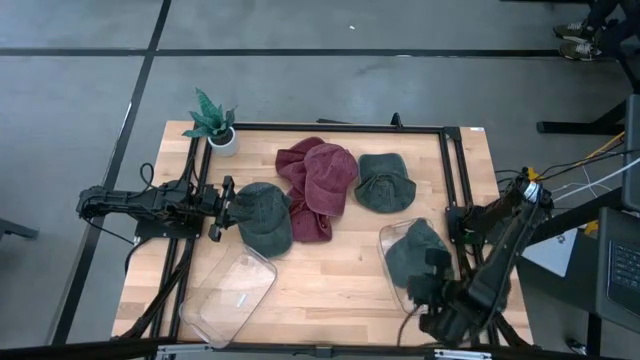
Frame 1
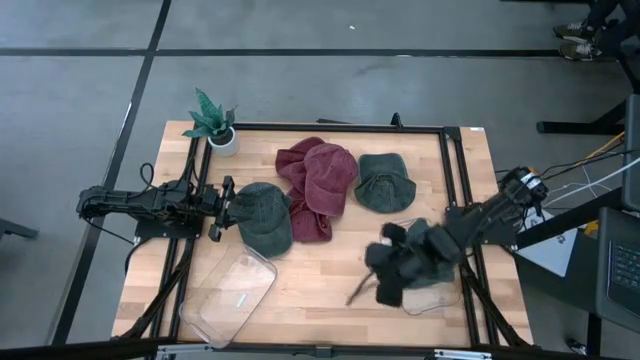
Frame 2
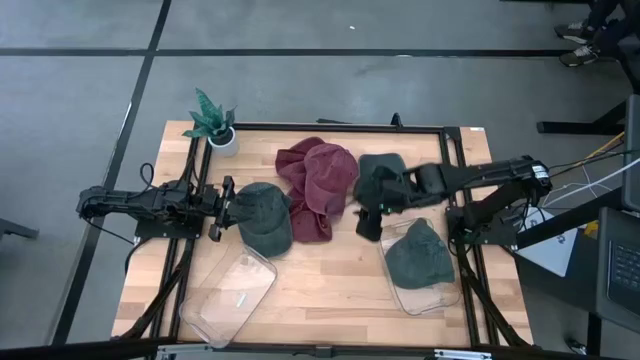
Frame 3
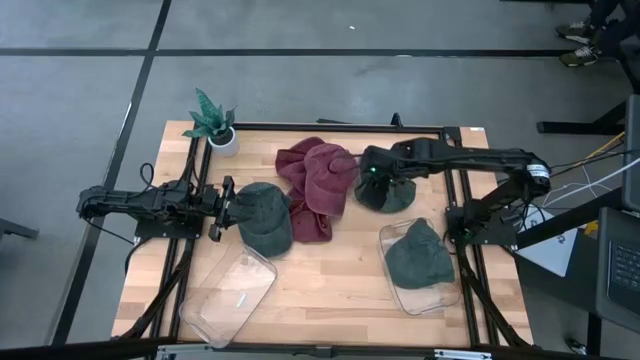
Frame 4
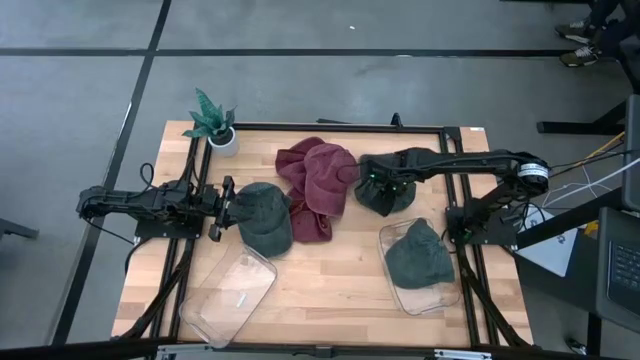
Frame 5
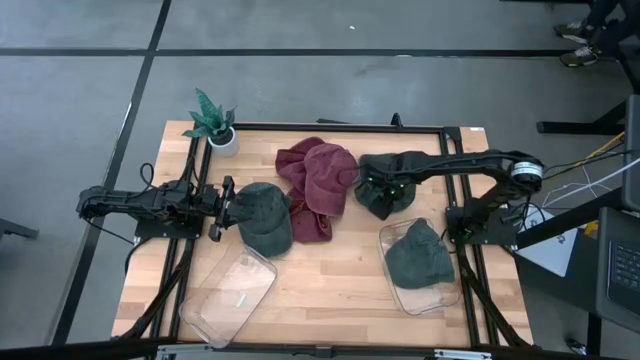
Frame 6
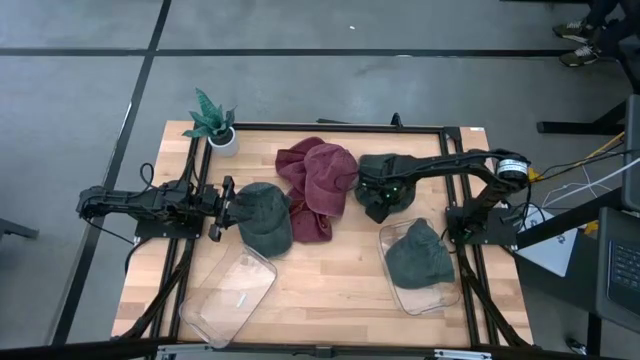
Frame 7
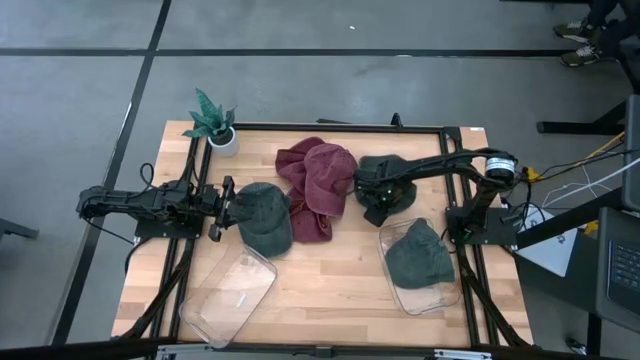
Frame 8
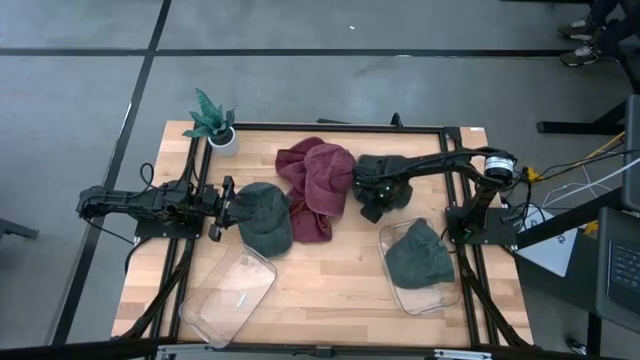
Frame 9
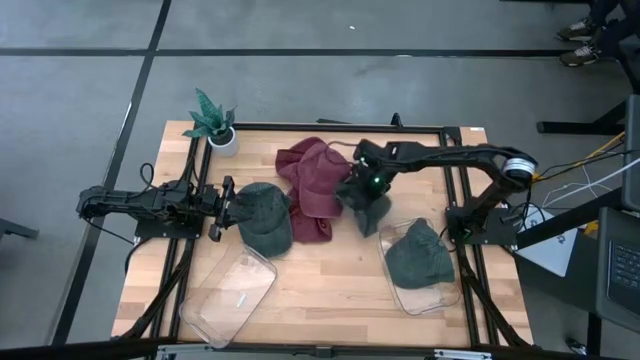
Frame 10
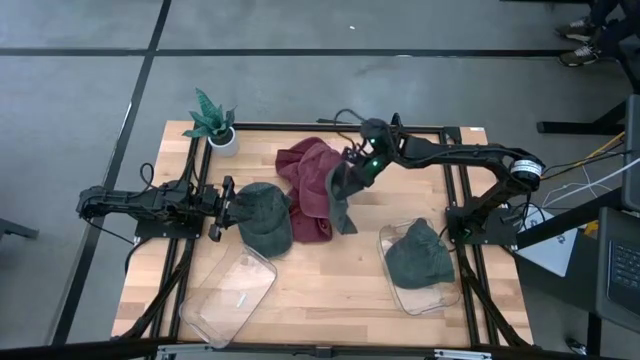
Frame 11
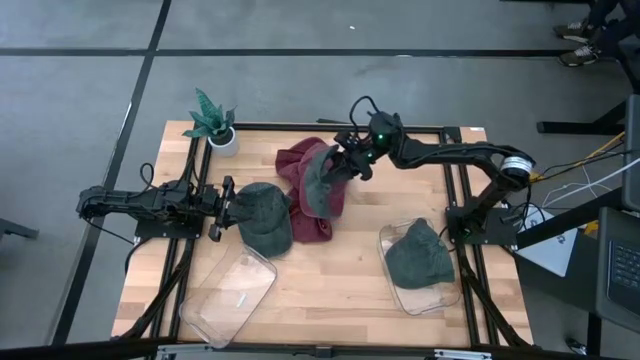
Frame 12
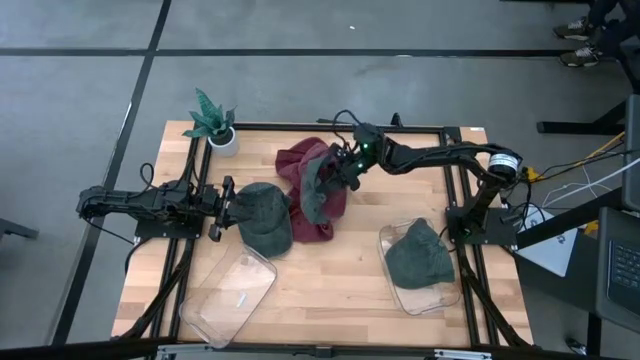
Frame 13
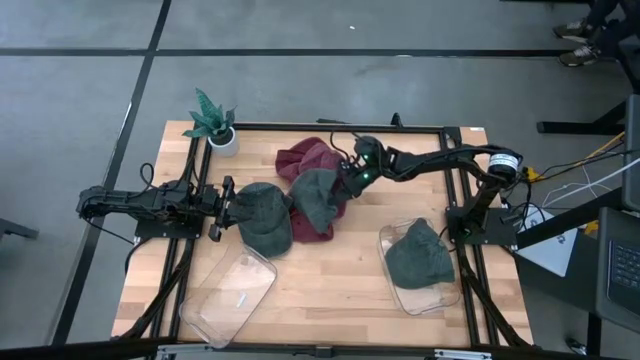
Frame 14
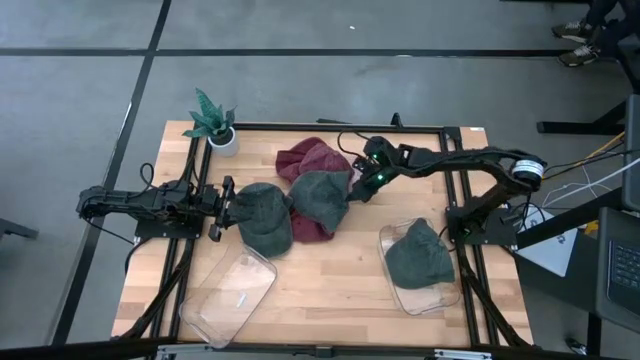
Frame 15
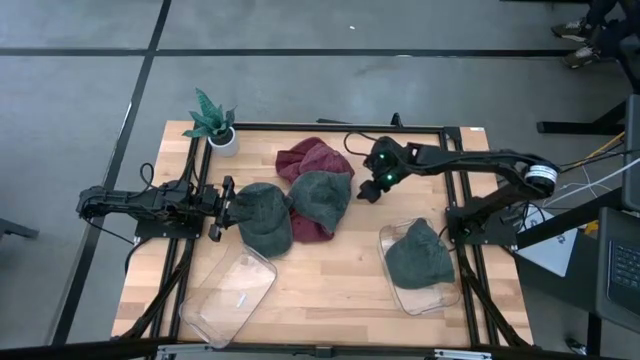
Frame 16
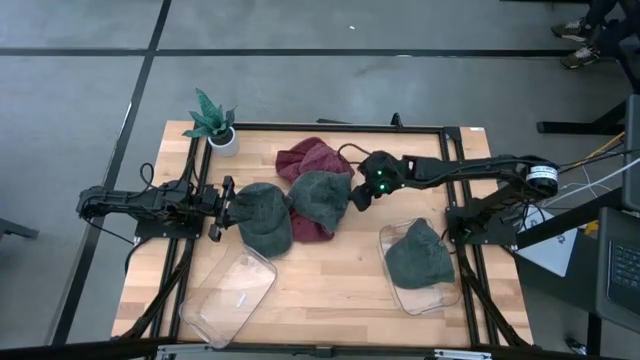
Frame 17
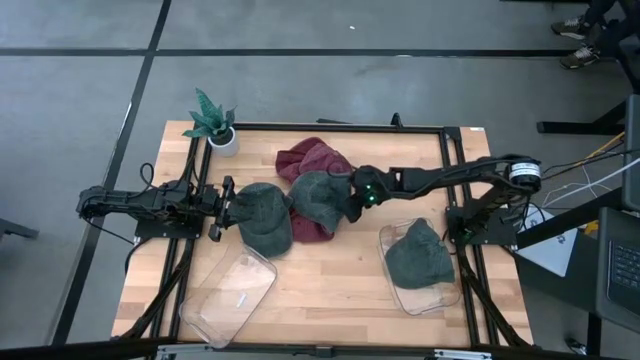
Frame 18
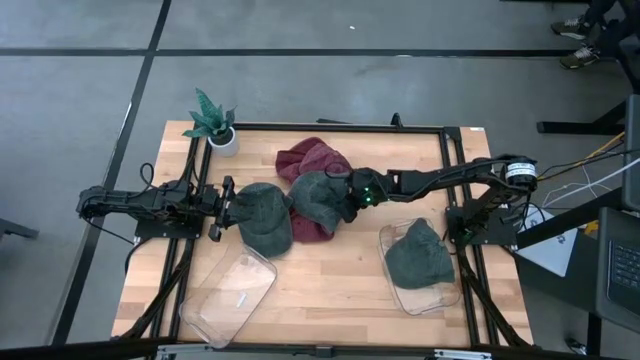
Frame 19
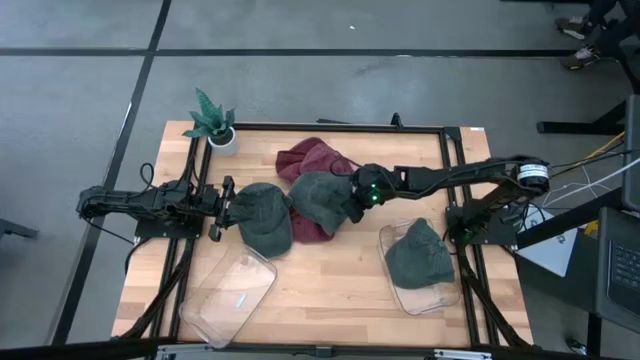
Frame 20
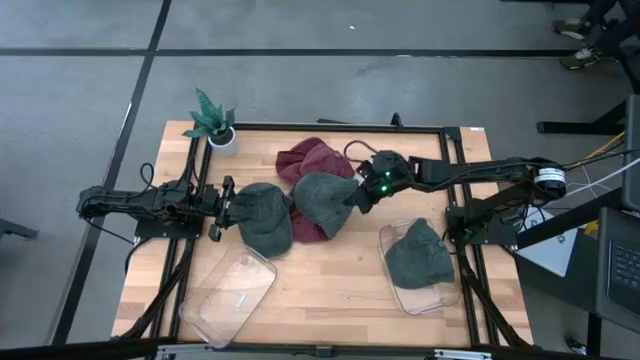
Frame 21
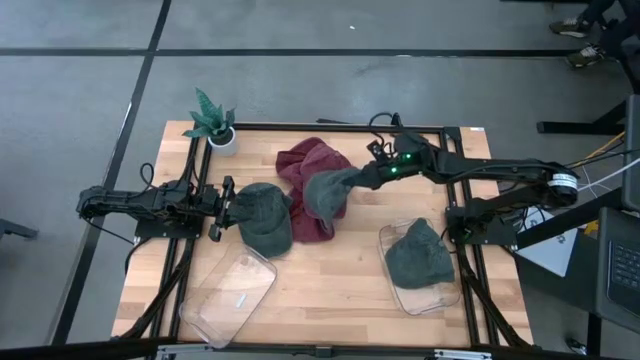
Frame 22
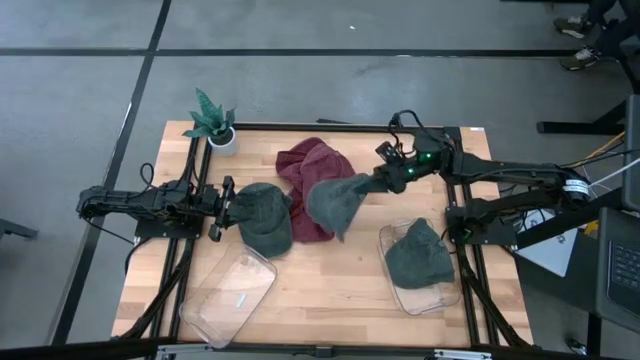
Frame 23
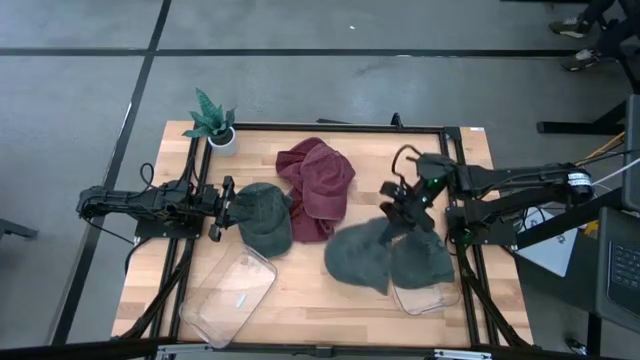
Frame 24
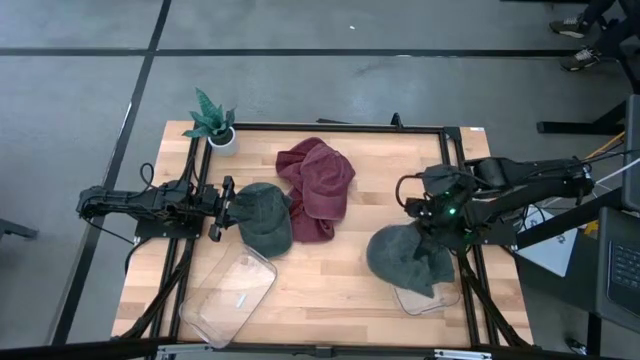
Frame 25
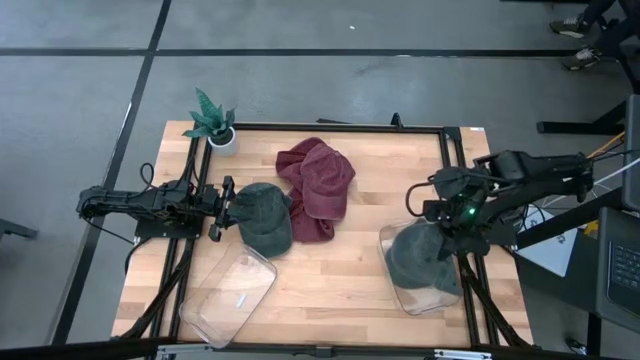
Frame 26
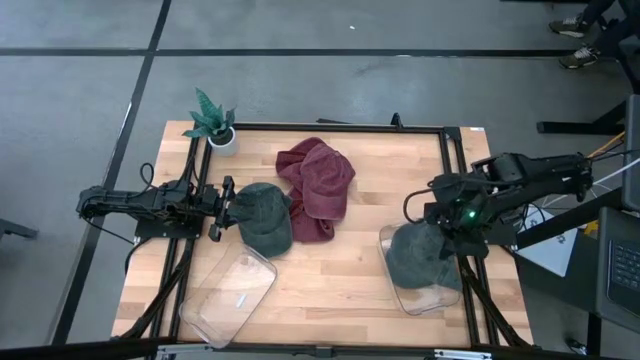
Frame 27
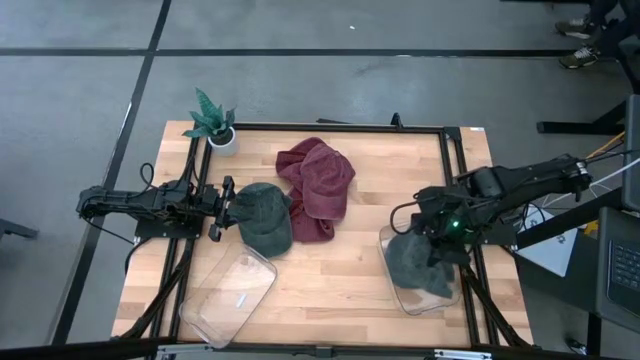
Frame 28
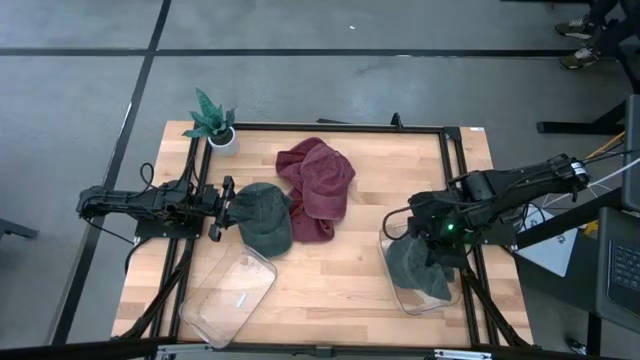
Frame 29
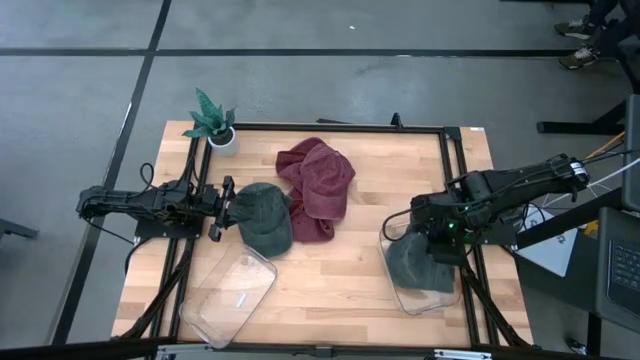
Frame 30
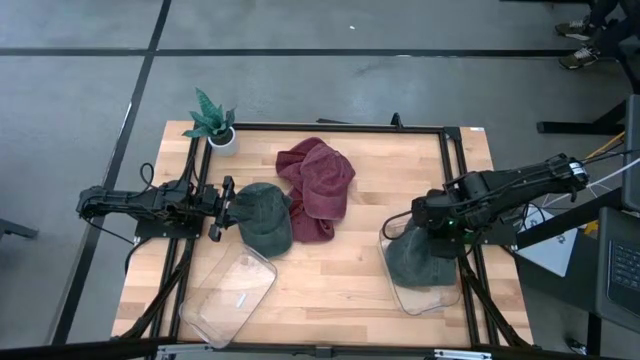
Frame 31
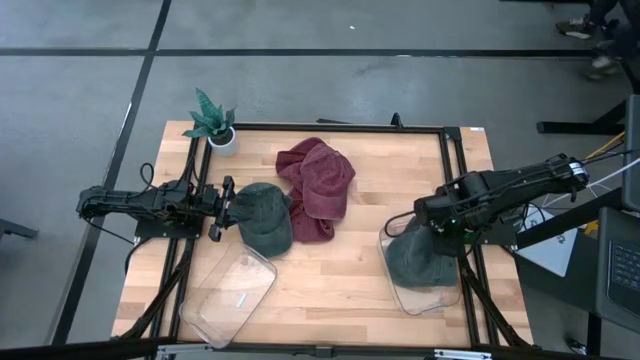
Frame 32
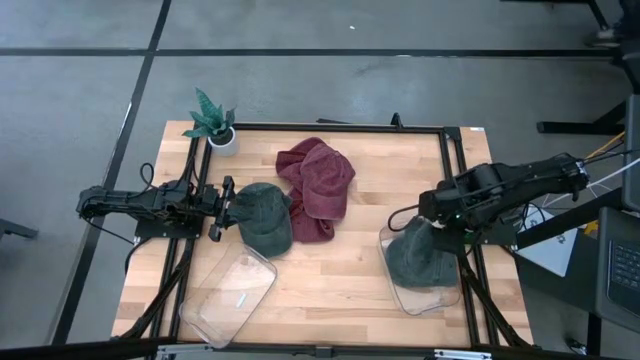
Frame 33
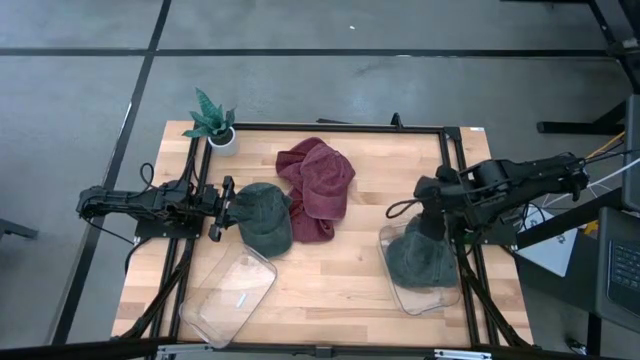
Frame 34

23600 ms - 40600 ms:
Task: Pick & Place hat
Put the right green cap into the right transparent bin

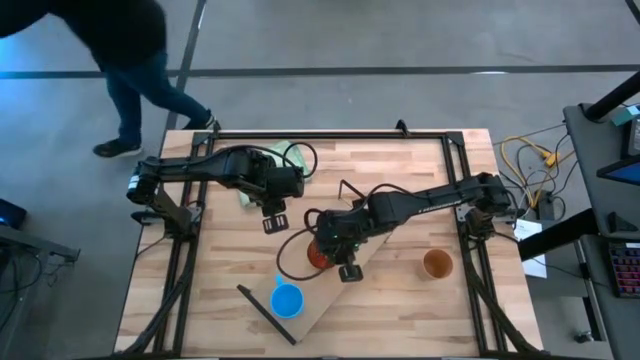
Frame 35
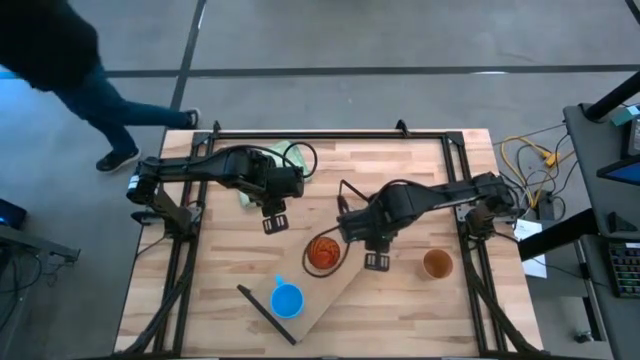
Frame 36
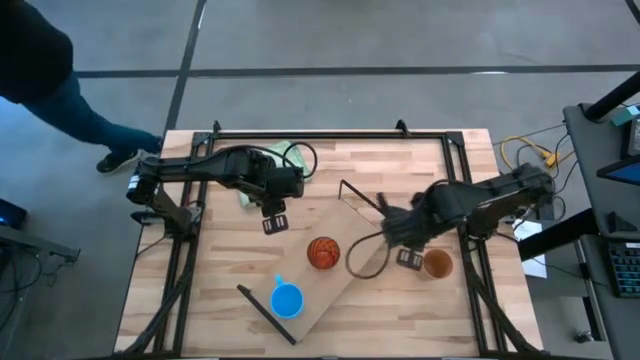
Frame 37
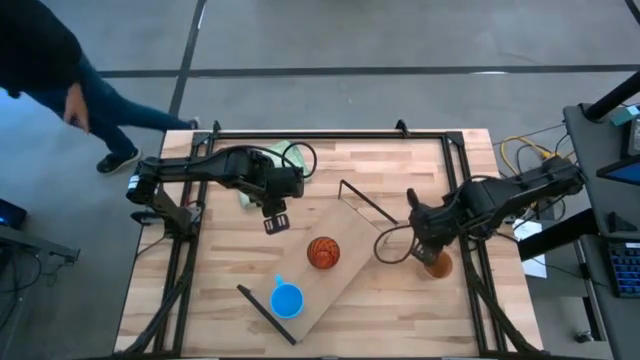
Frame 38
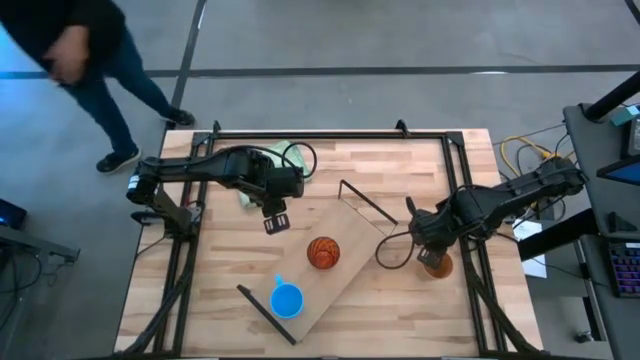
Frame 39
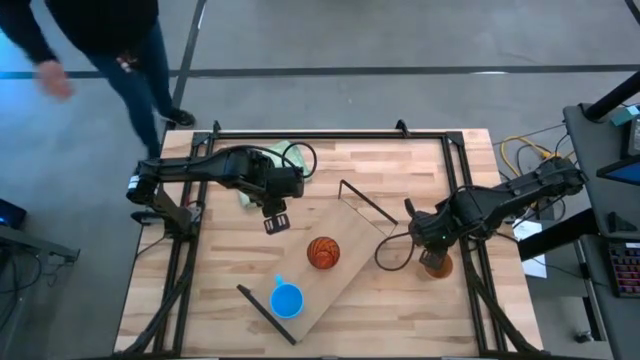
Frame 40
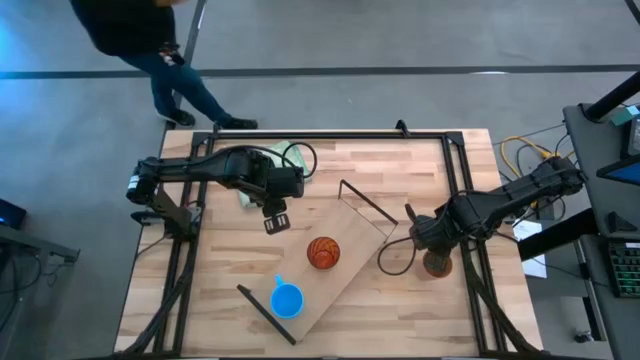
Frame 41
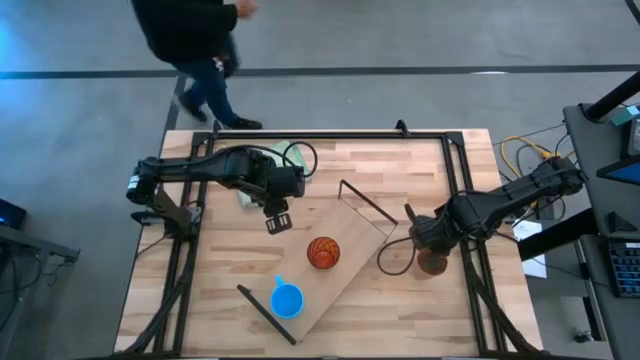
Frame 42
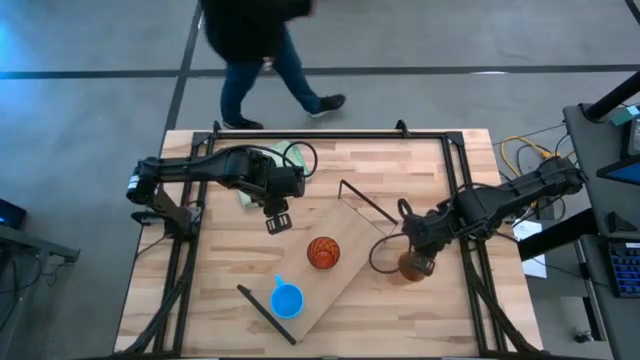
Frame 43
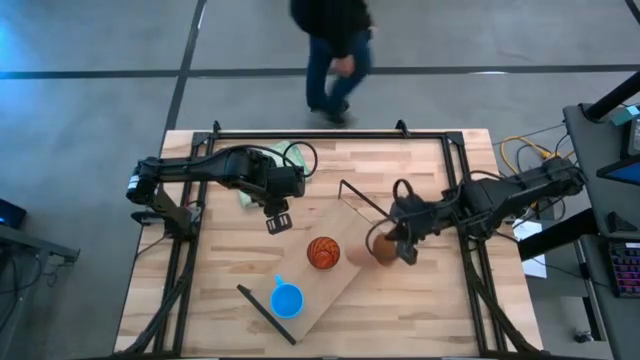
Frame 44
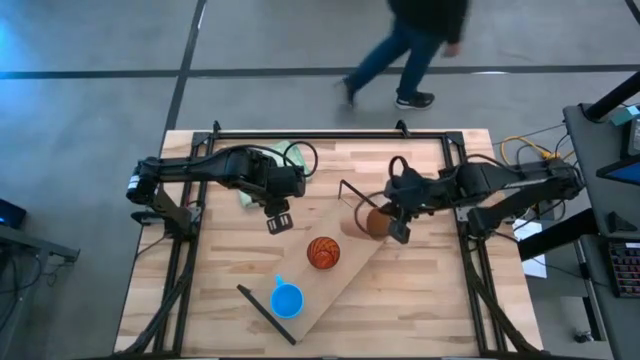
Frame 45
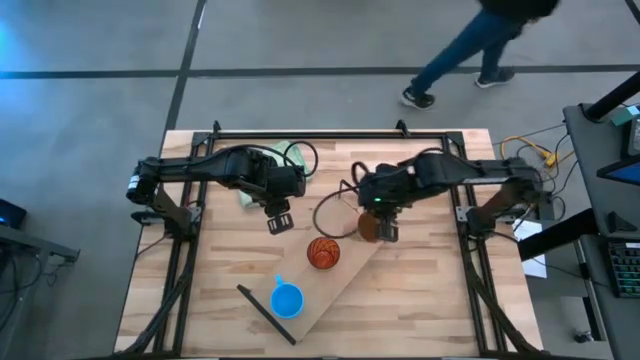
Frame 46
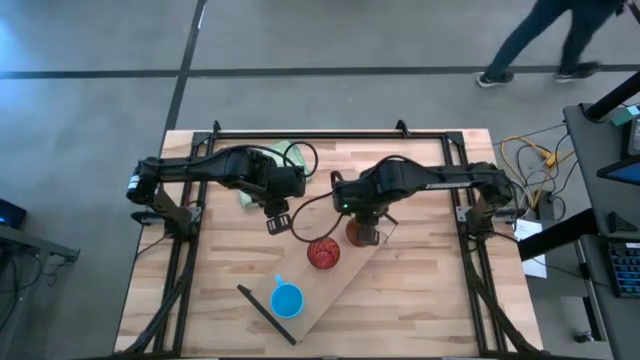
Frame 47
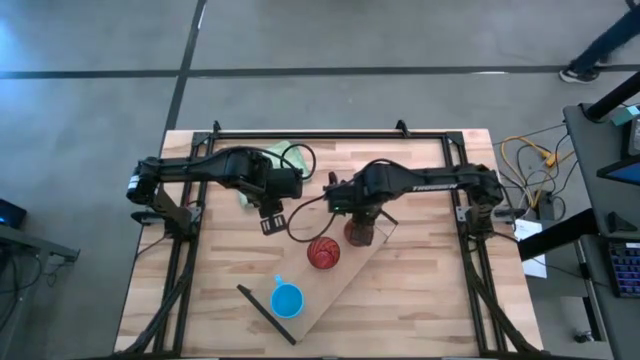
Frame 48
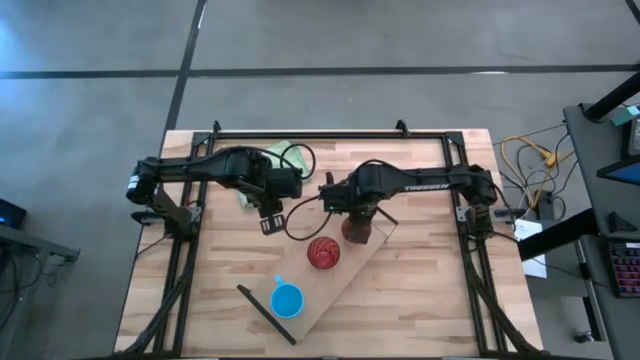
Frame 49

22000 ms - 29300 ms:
Task: Stack small to large cups/mugs on shelf
Put the light orange cup on the shelf
